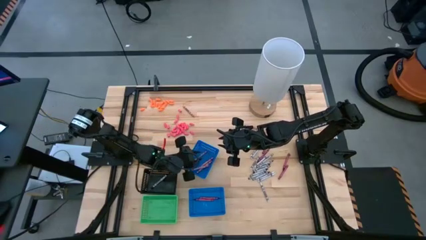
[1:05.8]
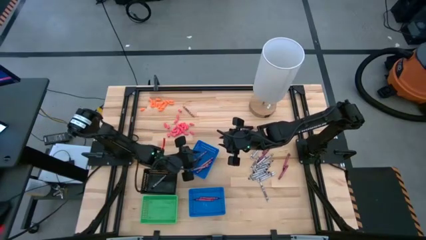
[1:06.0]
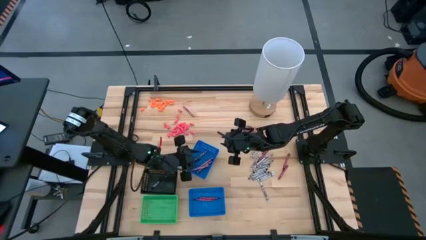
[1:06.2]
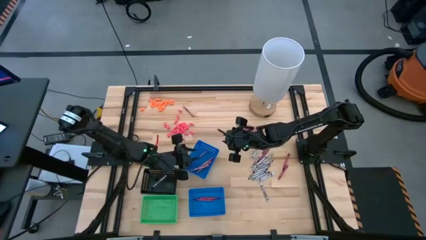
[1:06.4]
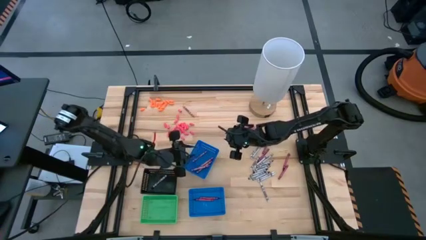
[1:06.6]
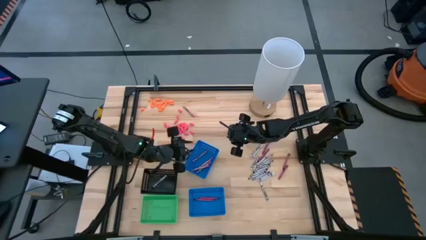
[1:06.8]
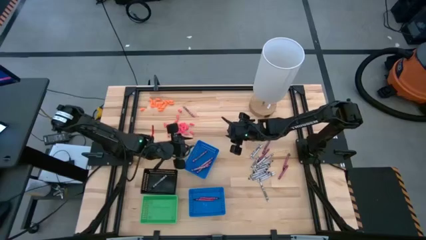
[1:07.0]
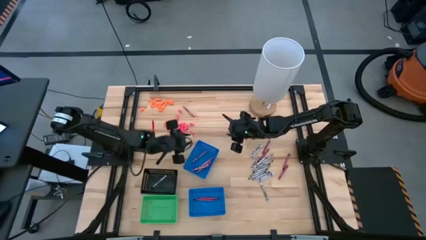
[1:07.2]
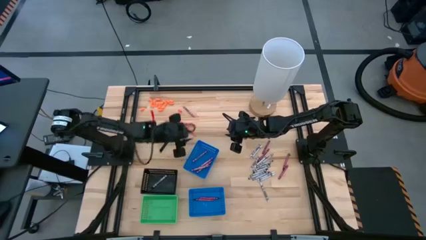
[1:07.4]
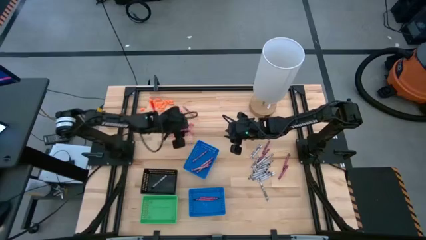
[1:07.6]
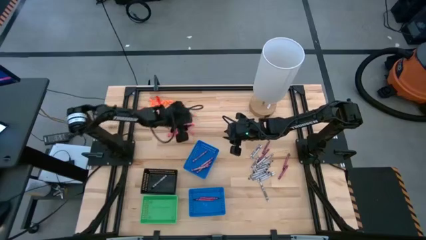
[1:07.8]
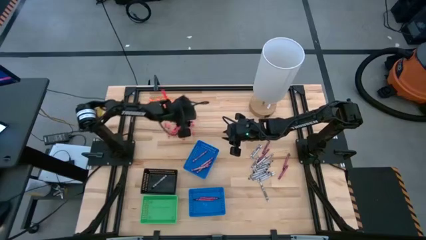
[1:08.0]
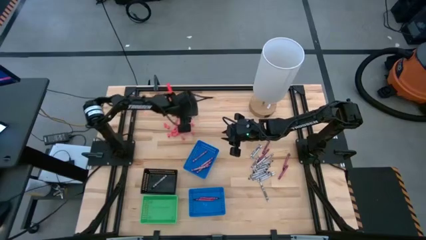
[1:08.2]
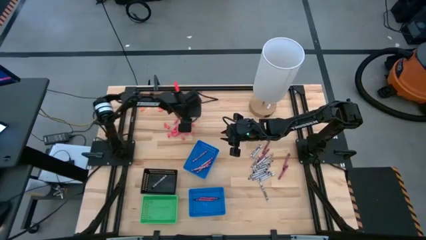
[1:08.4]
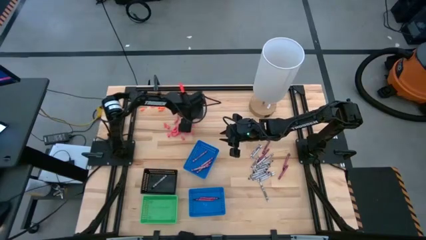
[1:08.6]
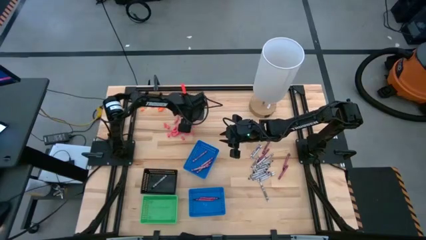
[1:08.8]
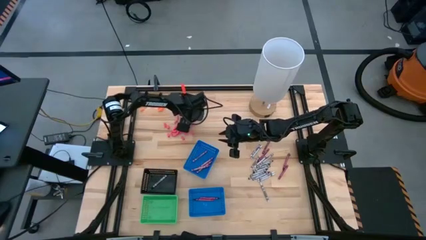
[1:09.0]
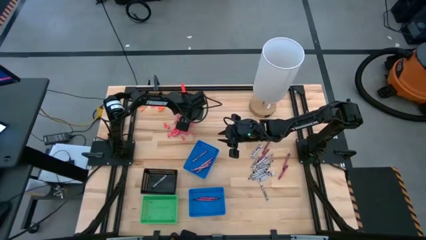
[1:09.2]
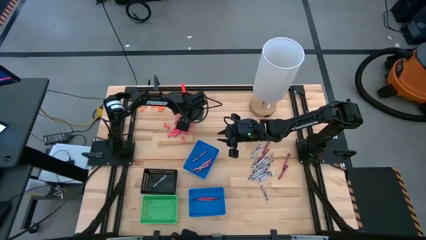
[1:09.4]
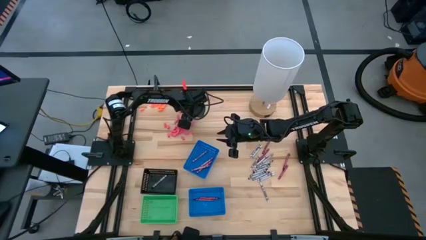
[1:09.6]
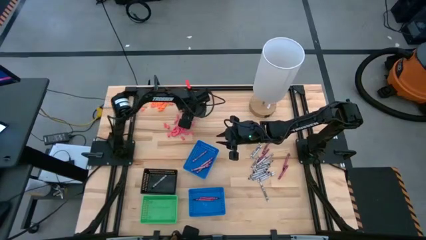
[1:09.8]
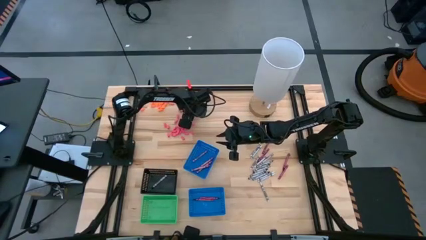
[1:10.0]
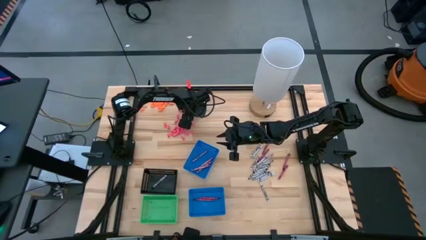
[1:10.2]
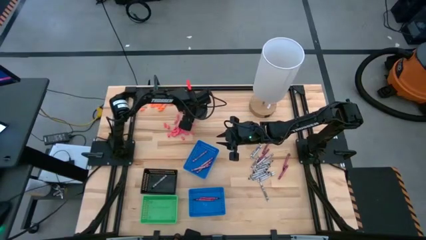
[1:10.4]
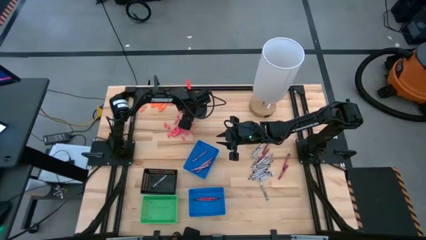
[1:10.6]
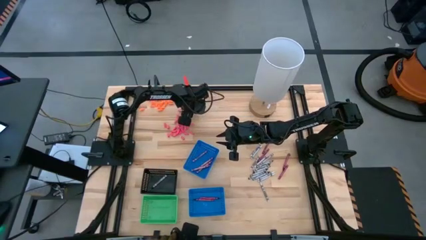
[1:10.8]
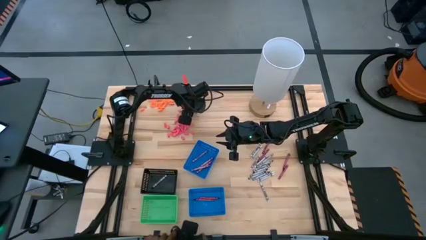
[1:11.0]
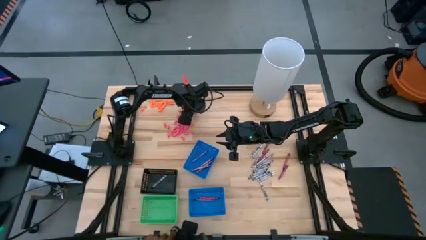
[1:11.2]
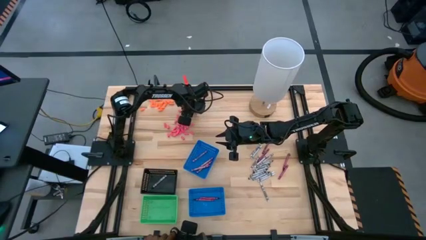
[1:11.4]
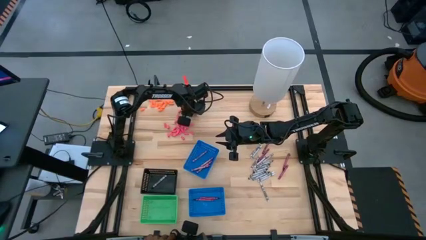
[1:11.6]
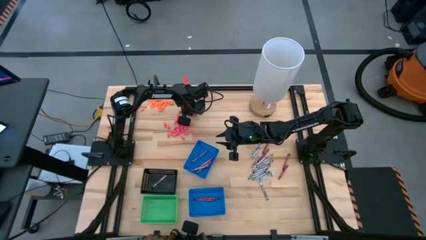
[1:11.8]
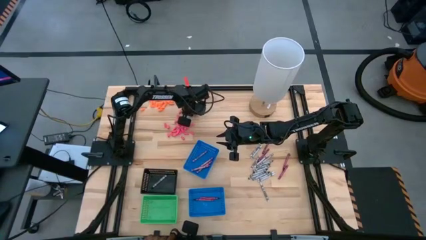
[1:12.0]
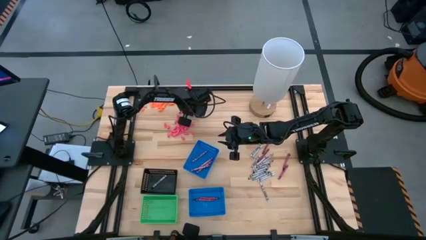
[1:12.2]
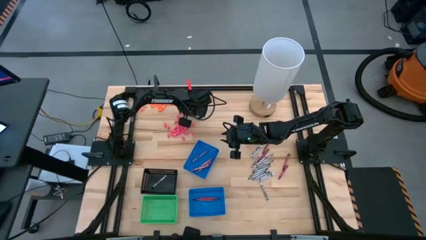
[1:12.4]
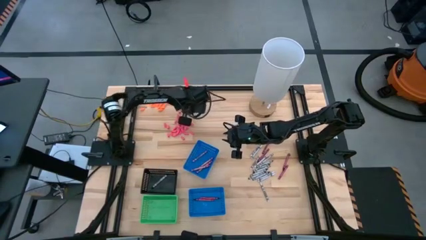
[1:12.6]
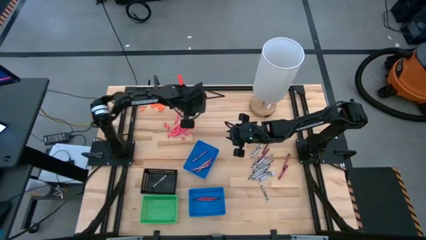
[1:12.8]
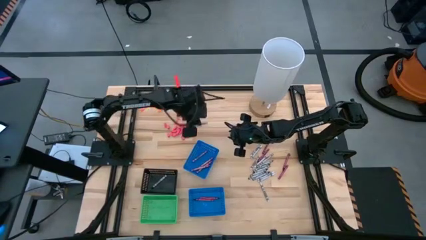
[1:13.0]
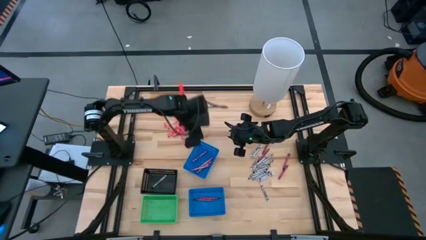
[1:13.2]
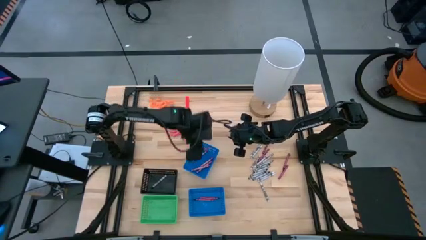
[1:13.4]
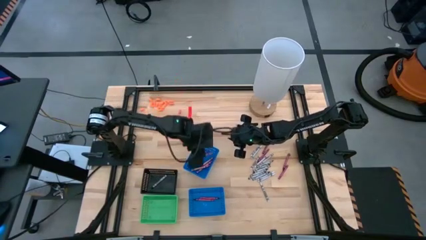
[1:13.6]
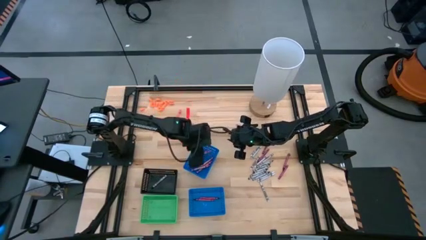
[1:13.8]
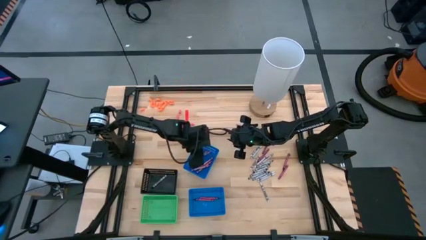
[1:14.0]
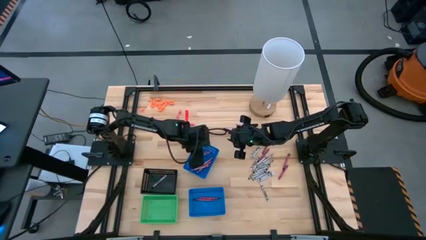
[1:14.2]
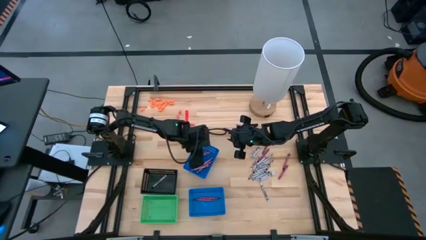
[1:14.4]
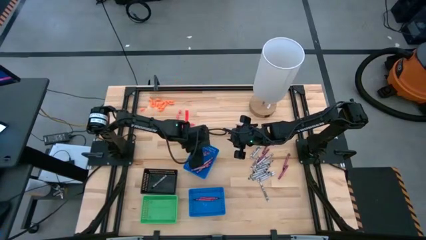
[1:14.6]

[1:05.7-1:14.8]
Task: Sort crayons
Put the pink crayon into the top blue bin

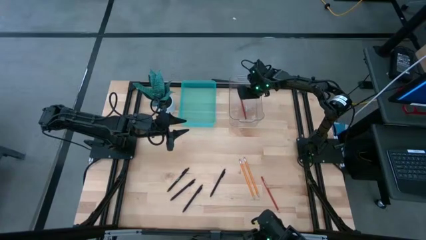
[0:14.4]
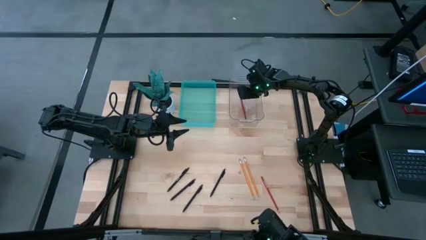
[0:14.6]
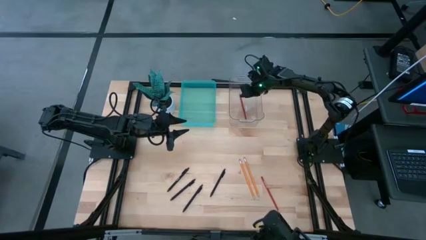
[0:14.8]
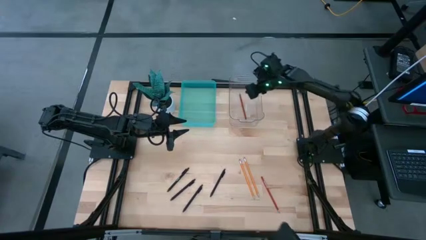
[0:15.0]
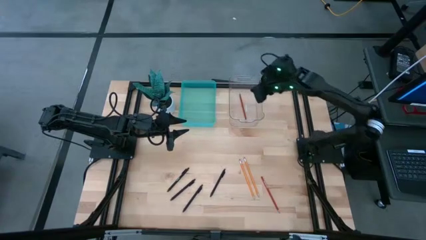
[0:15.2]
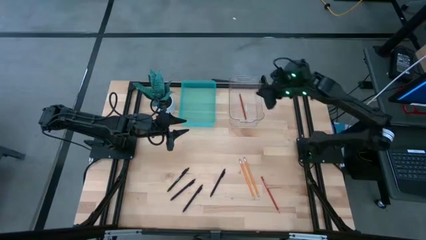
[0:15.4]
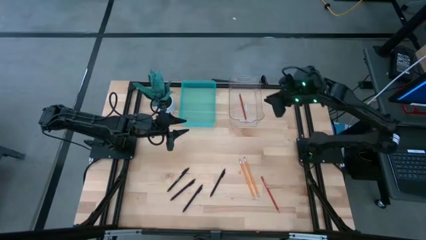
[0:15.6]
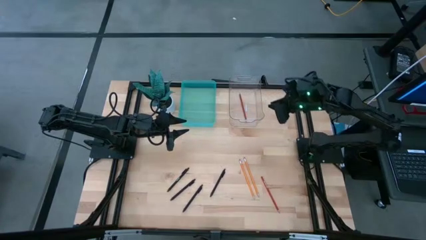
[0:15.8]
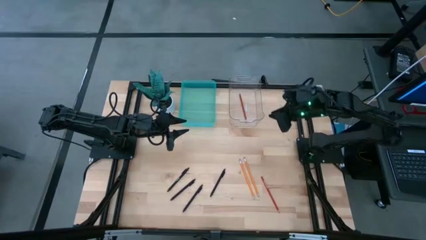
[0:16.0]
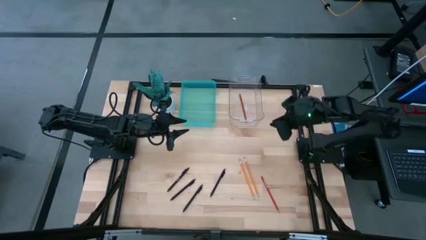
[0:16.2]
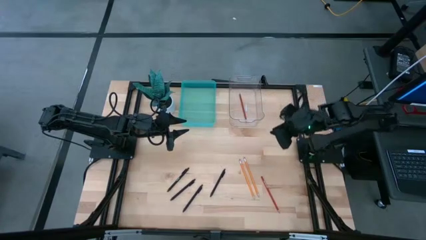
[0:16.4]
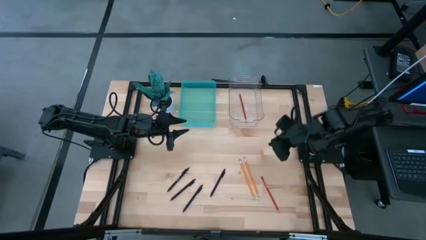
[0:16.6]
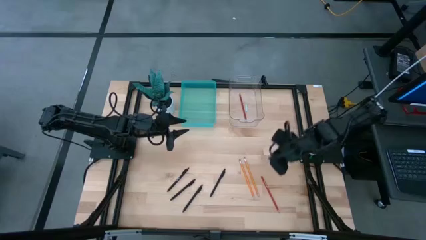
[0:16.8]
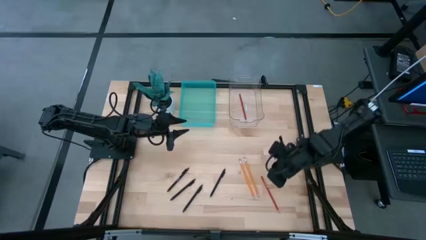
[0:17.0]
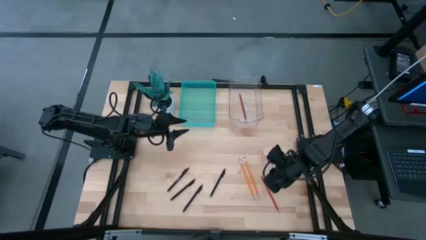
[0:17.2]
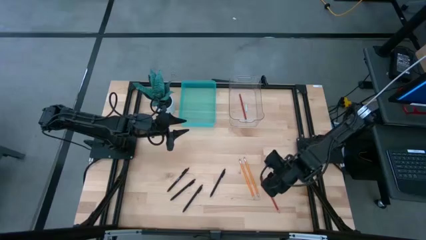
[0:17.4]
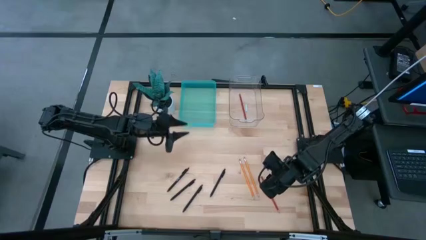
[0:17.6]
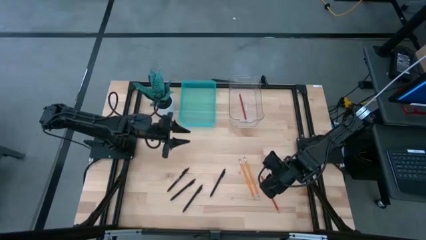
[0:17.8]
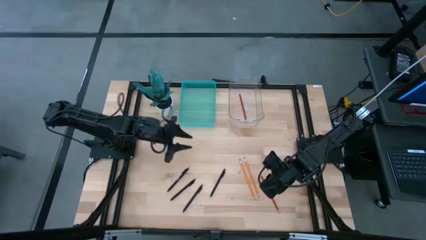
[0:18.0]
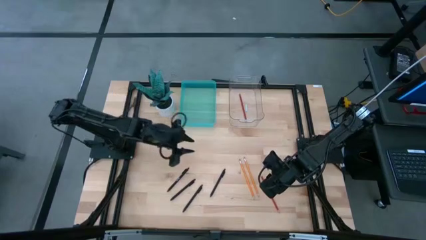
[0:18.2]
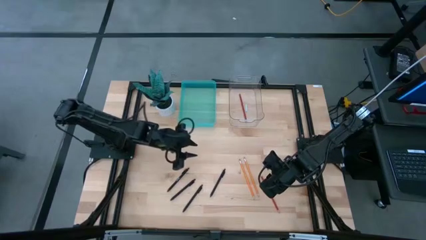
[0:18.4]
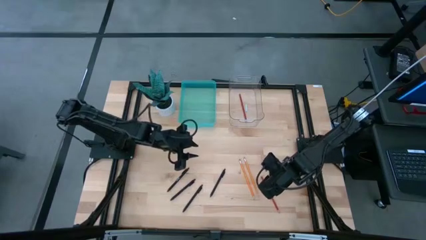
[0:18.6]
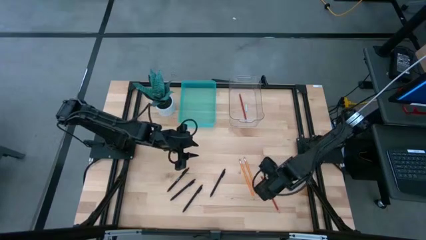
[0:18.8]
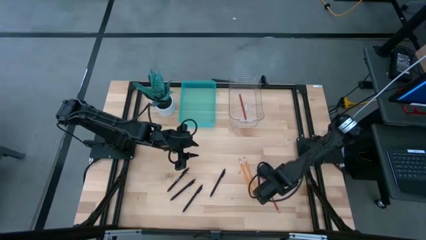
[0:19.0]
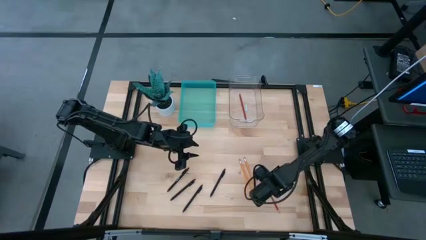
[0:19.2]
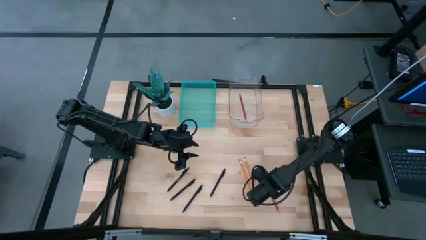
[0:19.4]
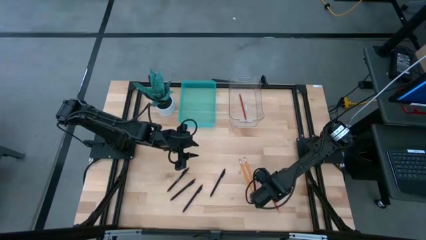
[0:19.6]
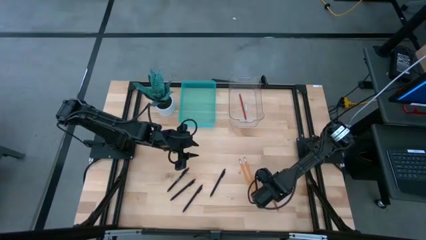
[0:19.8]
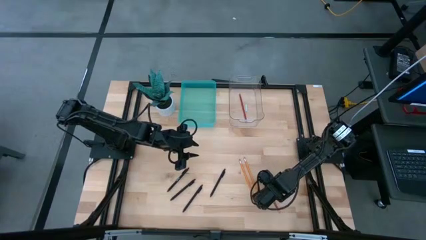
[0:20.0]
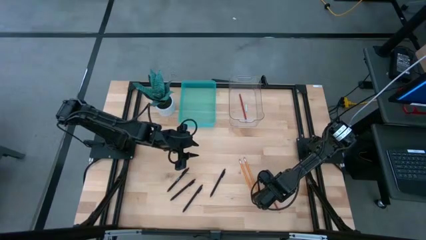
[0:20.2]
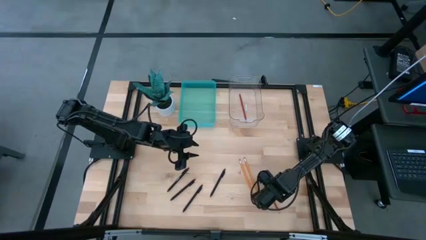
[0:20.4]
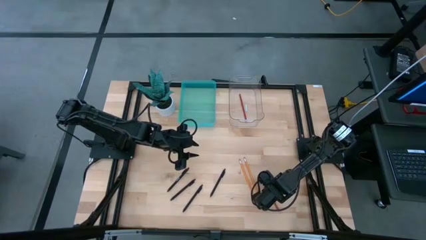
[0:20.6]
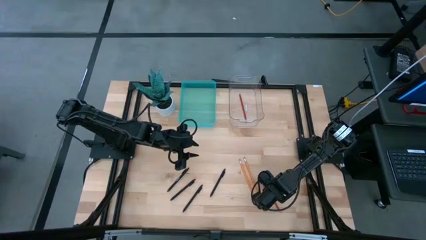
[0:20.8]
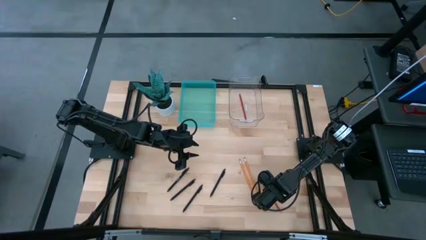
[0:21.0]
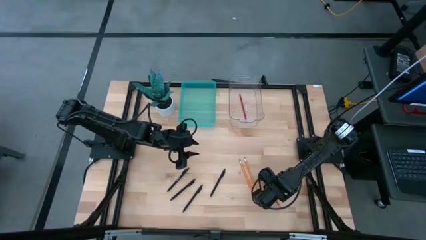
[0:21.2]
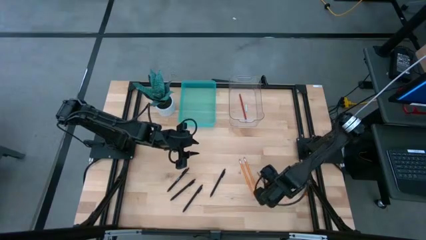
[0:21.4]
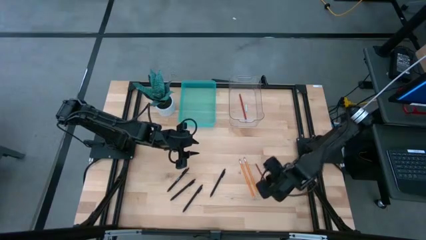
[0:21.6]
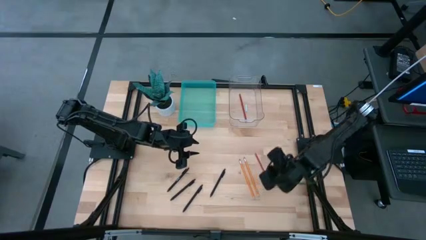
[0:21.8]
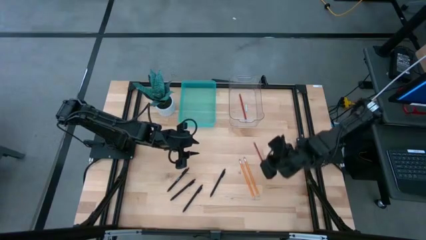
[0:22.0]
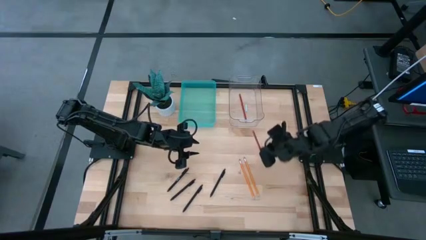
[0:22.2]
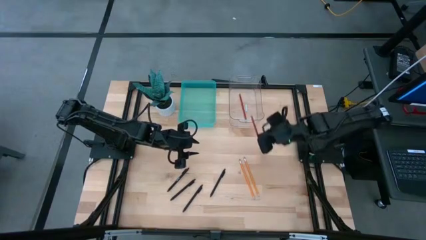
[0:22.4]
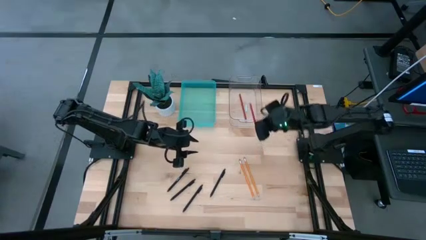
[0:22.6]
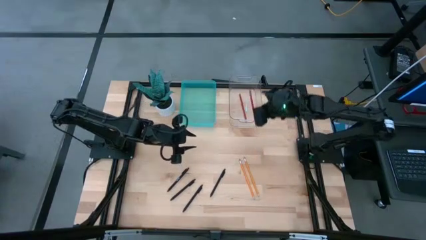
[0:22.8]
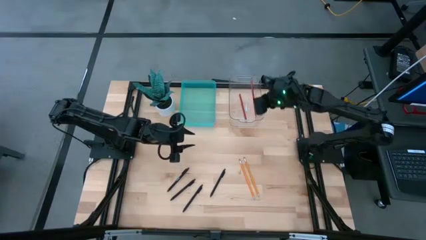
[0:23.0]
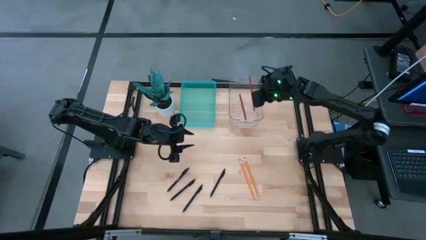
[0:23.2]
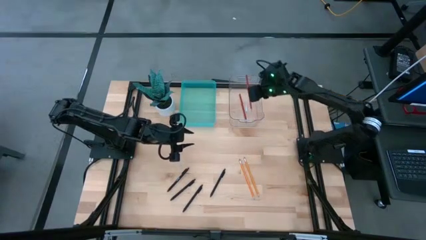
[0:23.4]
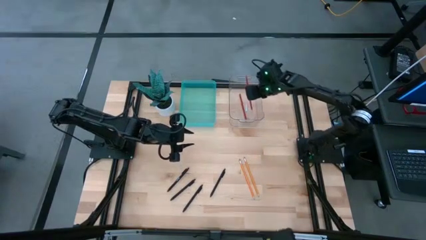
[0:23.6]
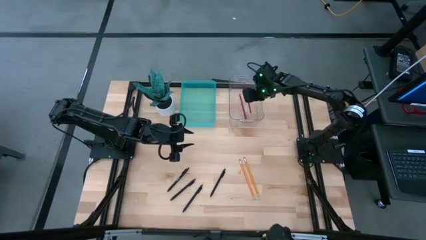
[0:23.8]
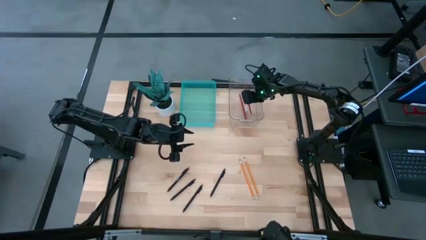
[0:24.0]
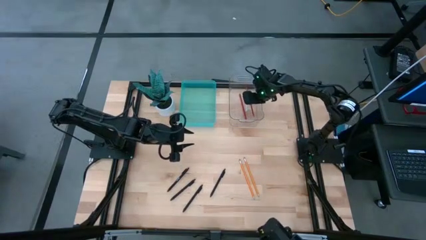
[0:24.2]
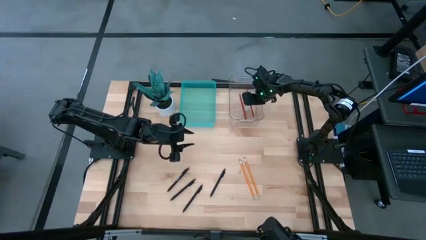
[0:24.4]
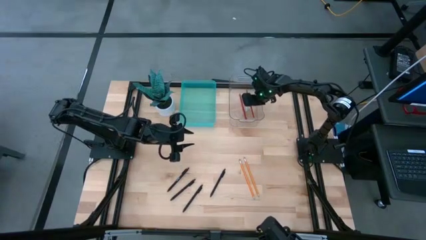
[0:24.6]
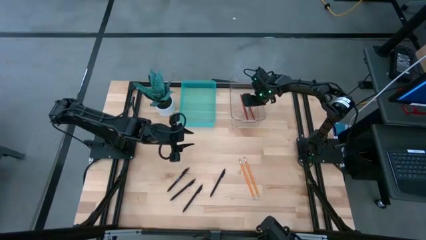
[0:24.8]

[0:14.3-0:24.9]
Task: Sort pens & pencils
Put the red pencil into the transparent bin
